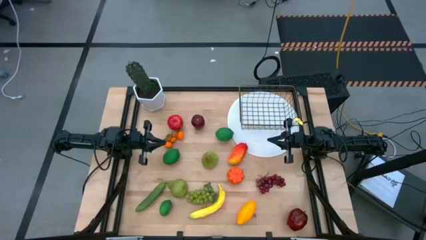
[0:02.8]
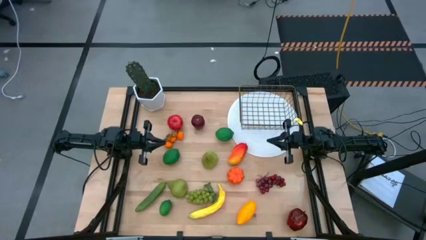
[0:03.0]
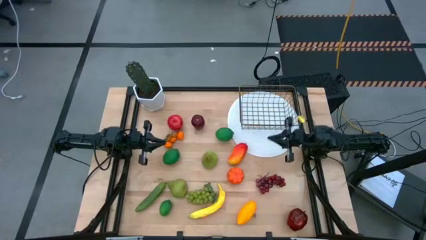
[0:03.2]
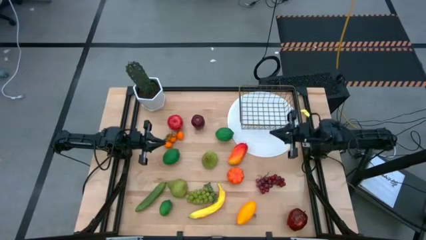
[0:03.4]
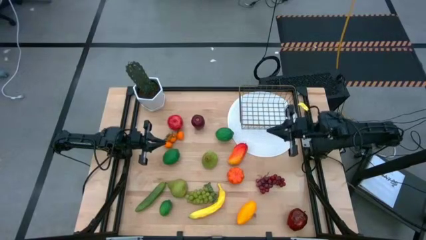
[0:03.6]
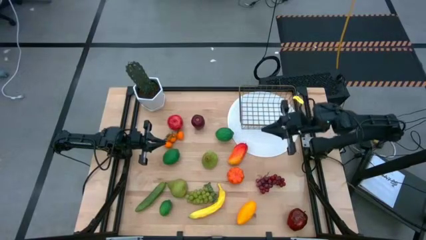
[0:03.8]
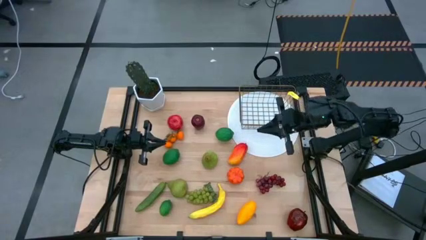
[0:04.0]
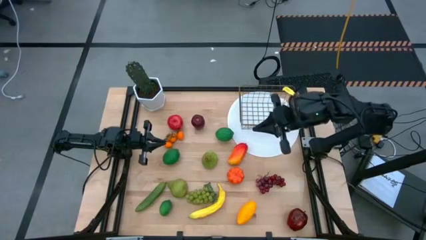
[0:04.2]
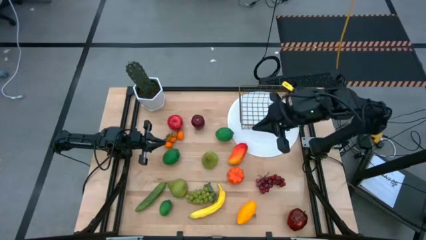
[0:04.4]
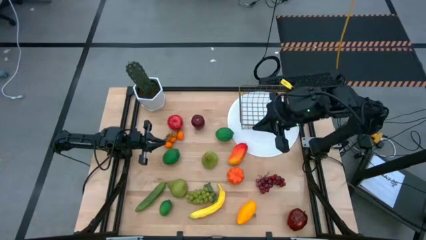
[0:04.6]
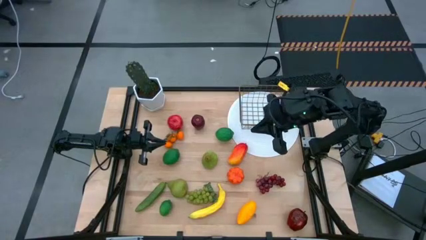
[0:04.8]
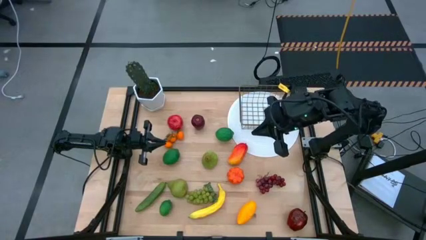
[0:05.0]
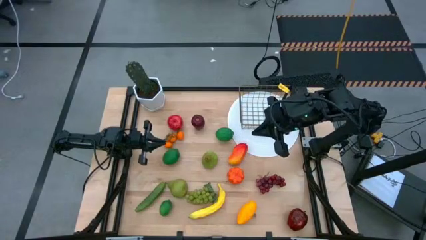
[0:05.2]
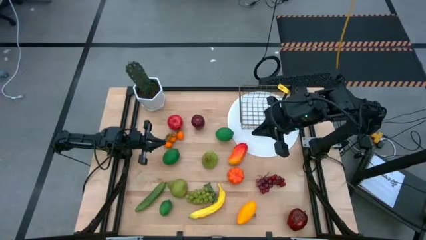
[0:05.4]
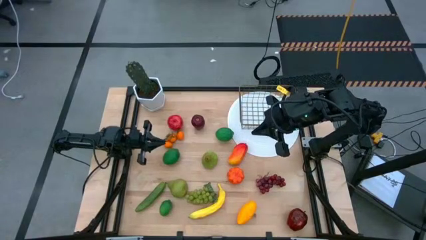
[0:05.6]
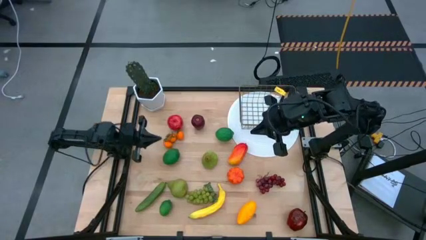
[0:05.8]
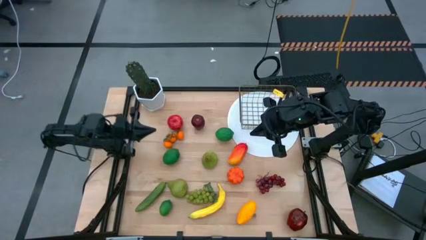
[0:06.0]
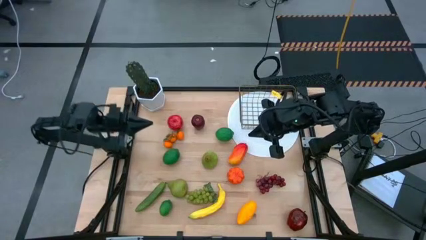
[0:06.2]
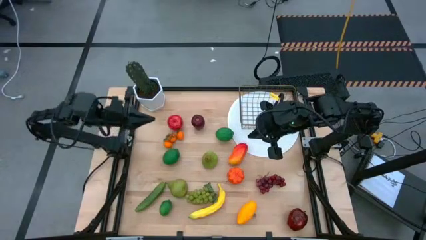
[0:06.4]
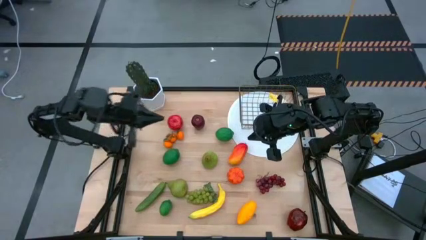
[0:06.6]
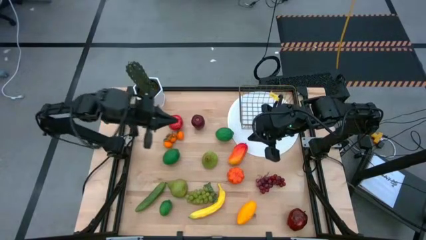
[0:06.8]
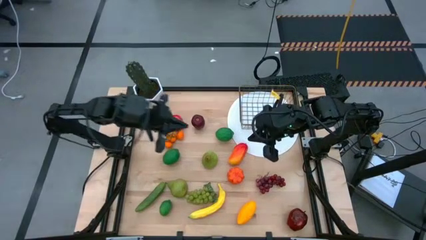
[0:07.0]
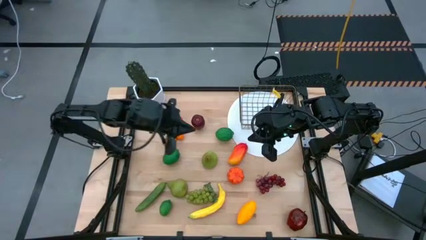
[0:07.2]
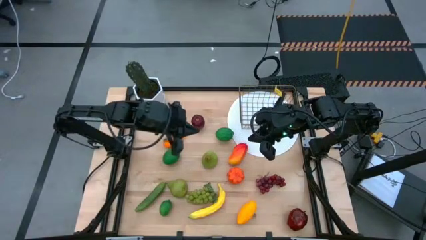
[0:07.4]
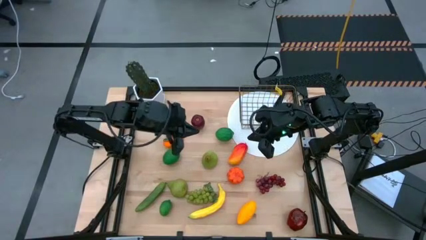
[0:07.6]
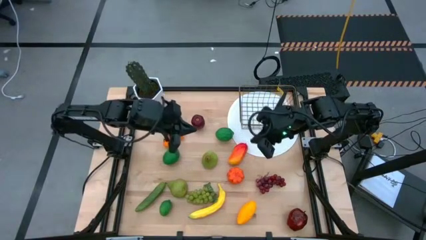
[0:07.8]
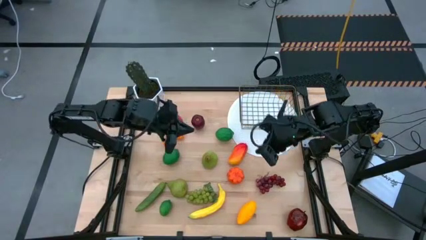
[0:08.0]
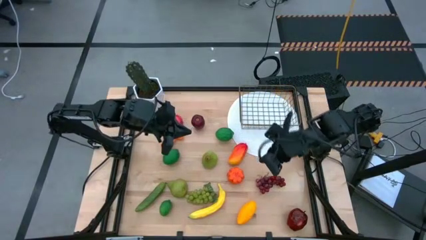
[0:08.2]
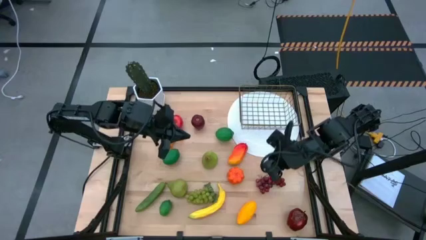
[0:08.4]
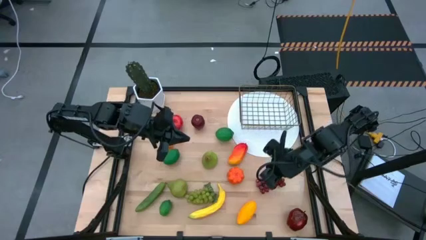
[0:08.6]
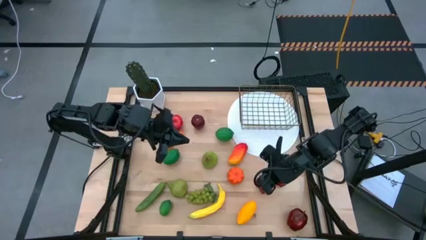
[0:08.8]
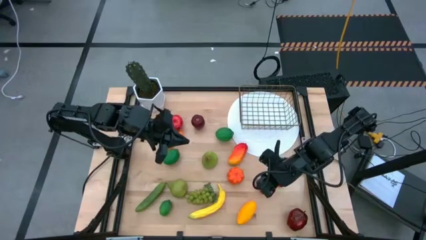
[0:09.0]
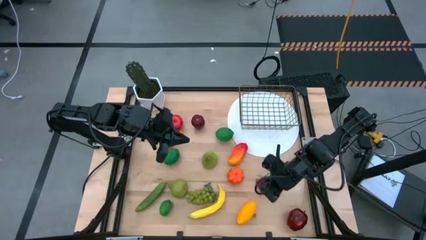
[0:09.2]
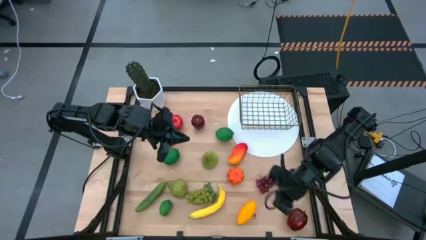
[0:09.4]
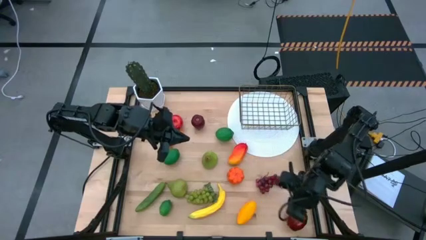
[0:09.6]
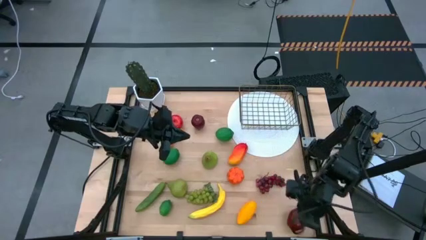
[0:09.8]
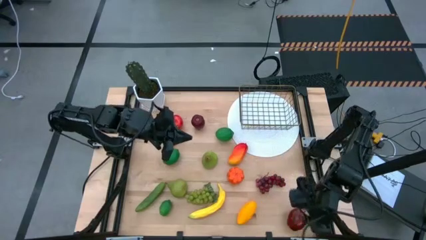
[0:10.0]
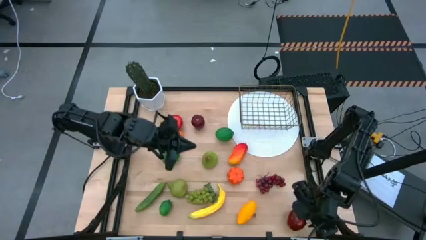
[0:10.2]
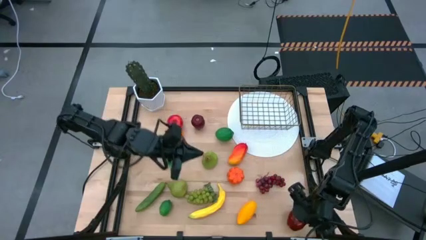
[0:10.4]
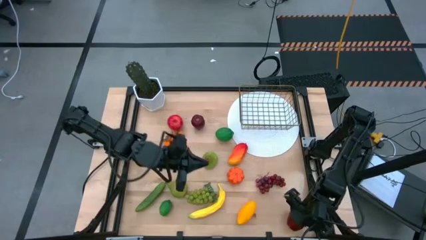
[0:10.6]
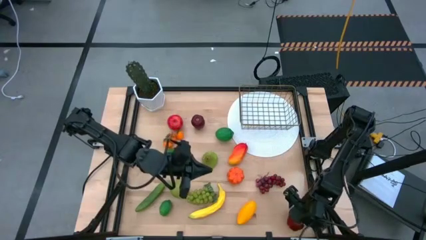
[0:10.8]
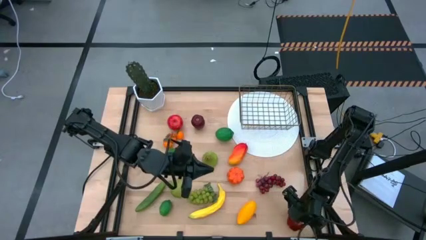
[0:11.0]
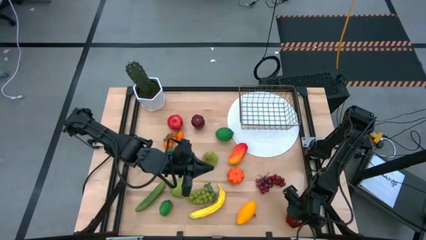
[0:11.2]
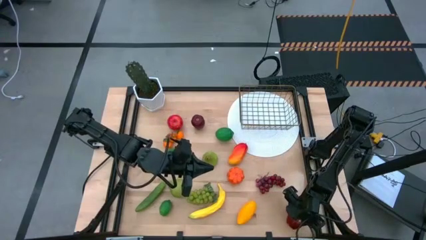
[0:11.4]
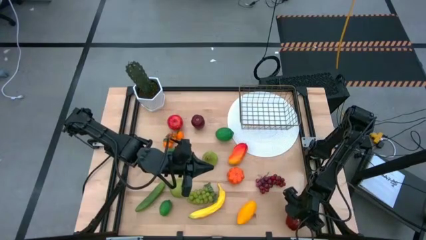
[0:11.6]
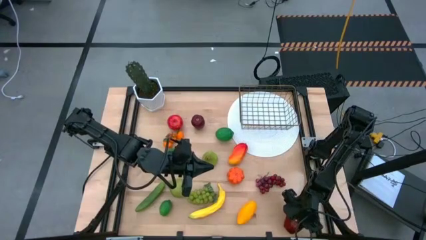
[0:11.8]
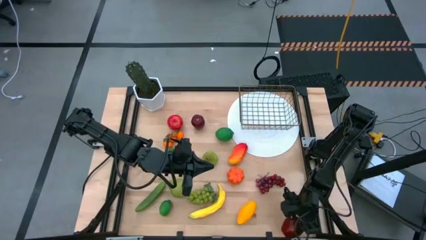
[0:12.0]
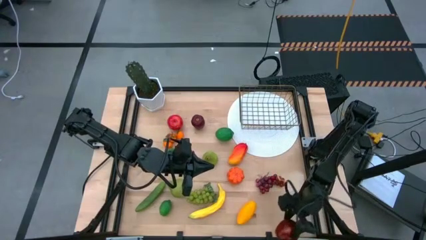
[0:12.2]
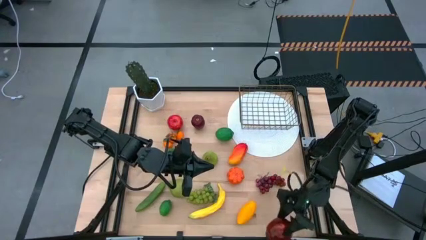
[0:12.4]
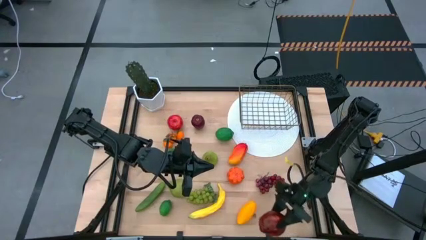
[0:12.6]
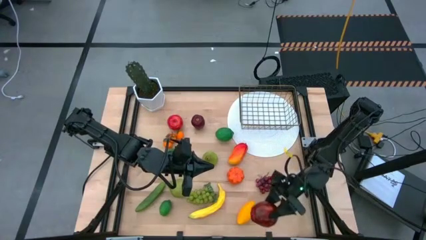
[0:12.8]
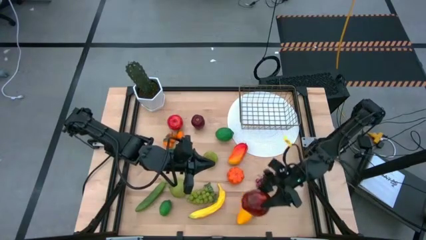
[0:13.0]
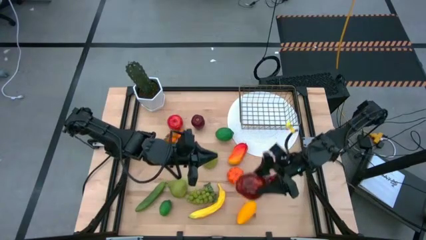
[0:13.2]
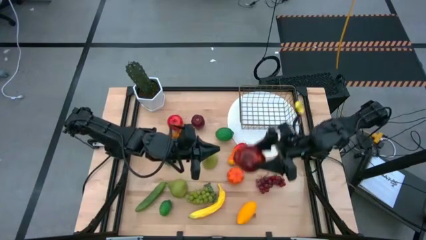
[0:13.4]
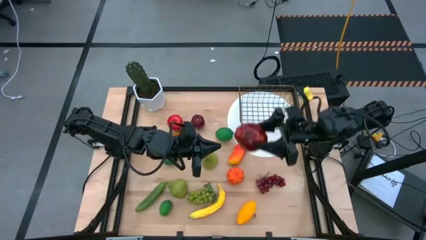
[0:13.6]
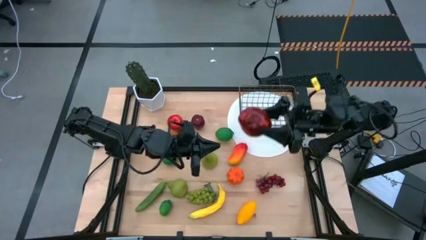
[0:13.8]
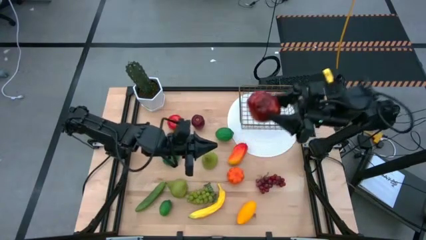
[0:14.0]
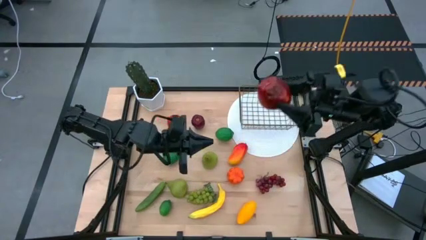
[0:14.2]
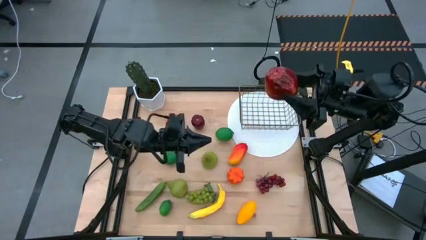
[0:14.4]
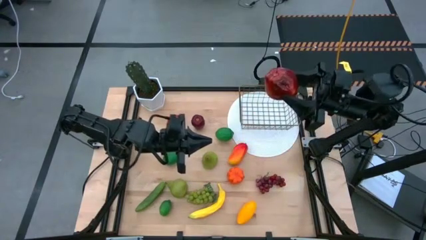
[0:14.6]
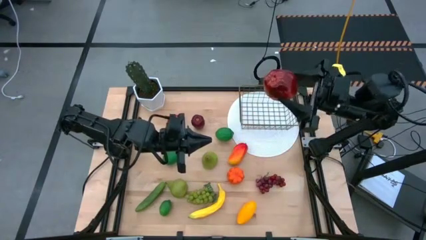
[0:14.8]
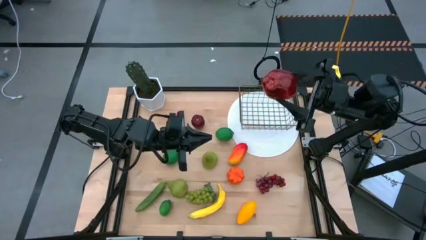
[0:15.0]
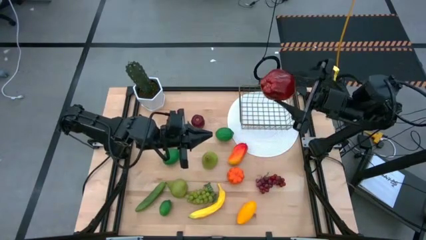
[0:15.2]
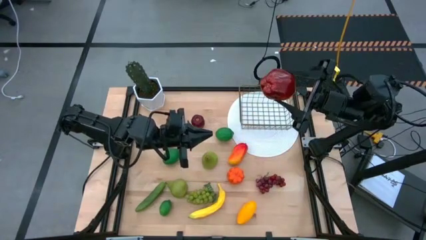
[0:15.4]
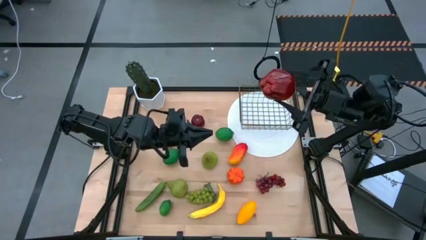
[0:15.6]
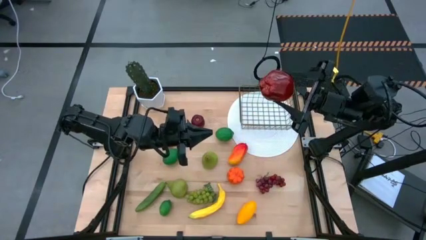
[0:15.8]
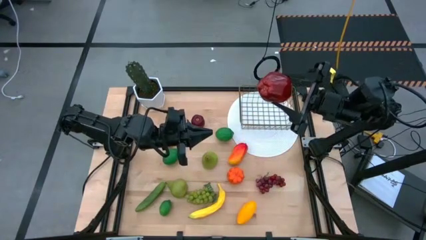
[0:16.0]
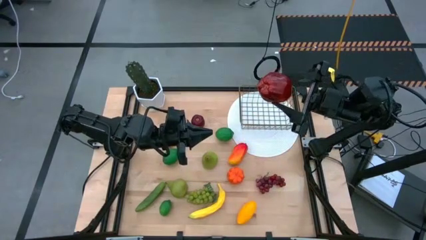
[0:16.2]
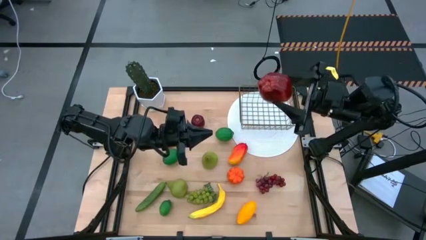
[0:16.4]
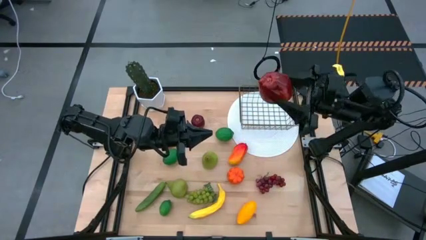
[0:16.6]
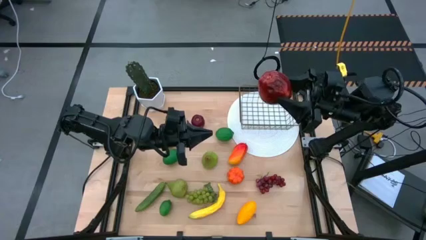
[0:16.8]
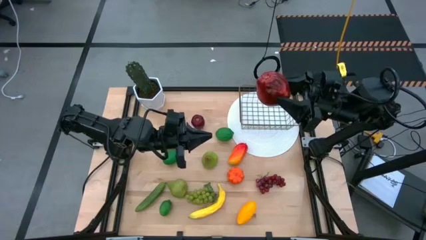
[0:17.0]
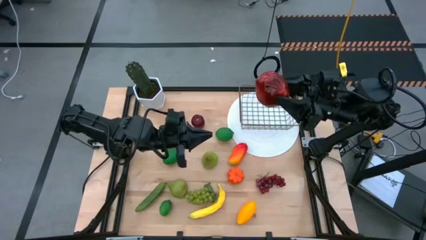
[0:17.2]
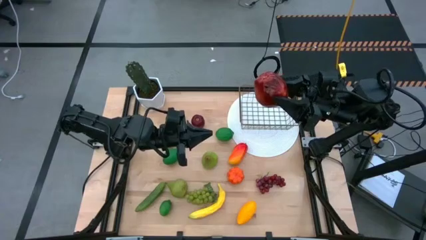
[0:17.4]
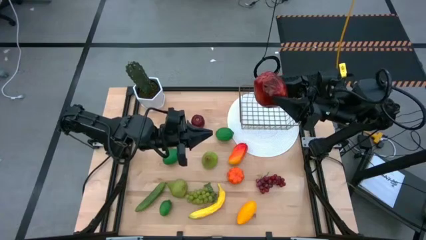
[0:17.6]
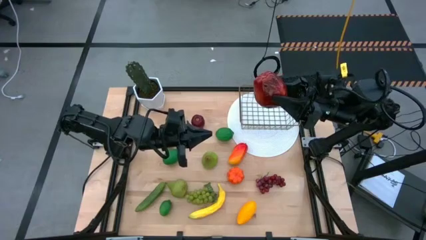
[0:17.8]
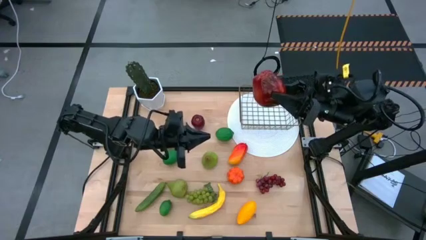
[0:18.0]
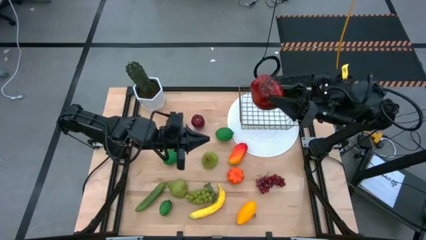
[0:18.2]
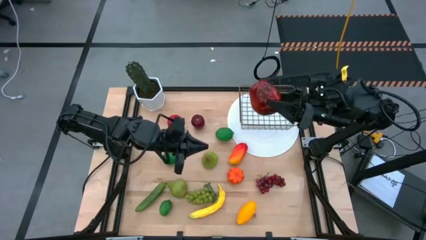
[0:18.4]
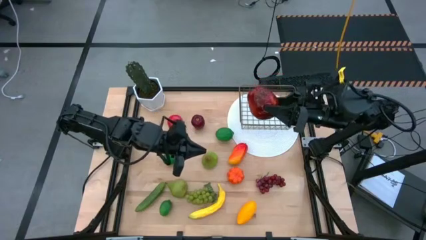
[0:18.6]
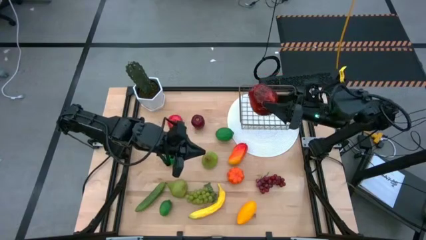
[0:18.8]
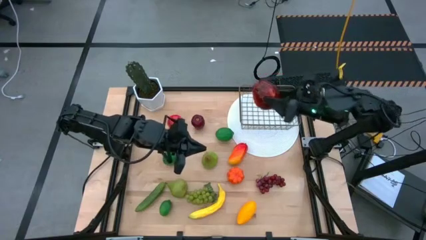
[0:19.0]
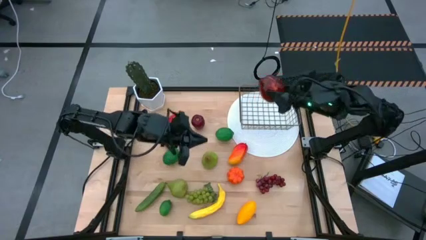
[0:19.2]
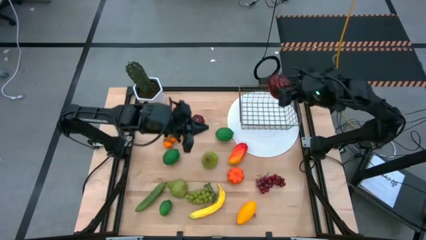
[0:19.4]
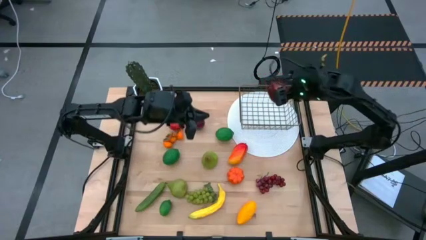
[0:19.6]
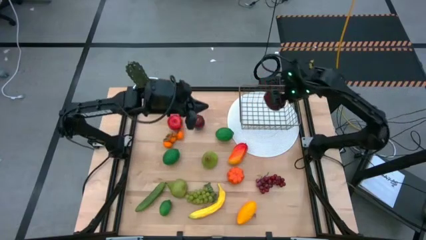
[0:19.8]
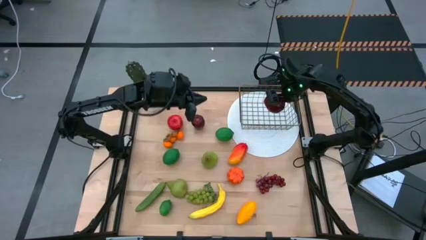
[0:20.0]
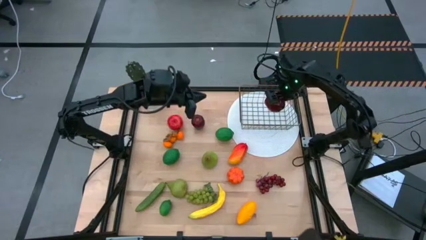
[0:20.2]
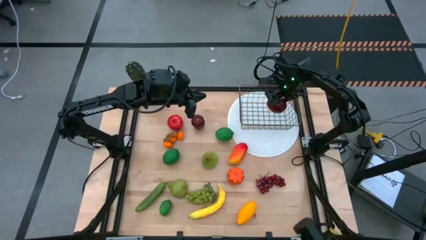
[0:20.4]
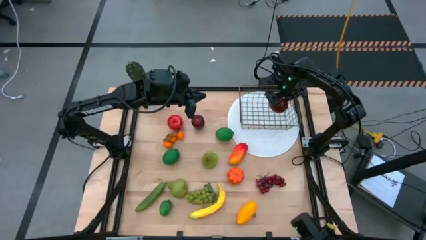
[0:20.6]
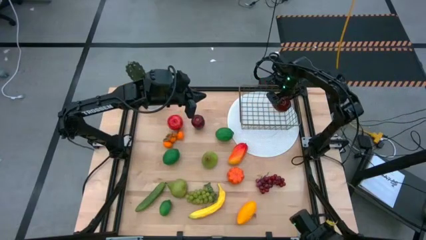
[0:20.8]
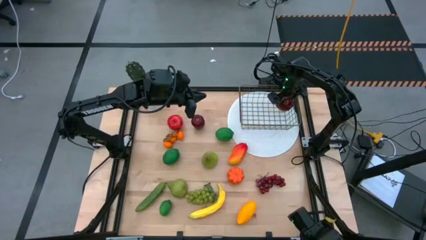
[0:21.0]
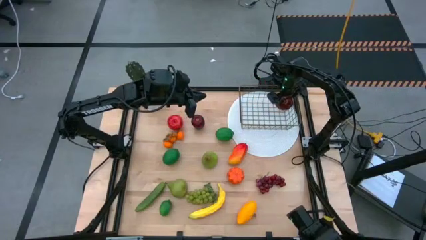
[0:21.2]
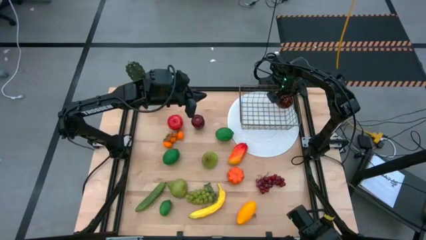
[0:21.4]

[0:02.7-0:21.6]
Task: Build produce basket
Put the bottom dark red apple into the gold wire basket
